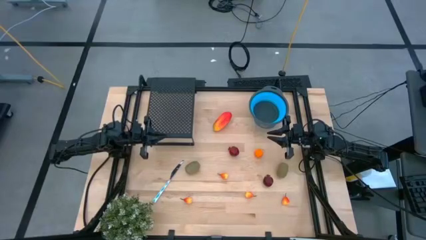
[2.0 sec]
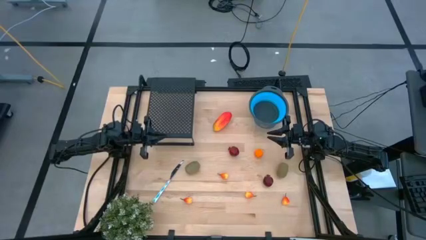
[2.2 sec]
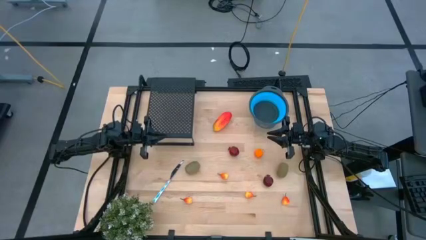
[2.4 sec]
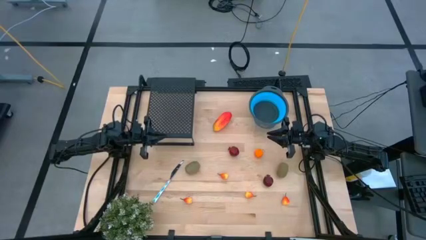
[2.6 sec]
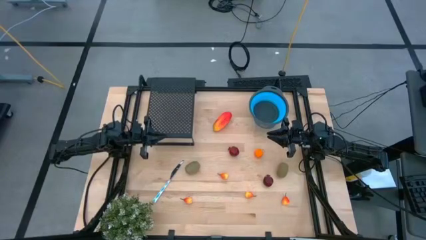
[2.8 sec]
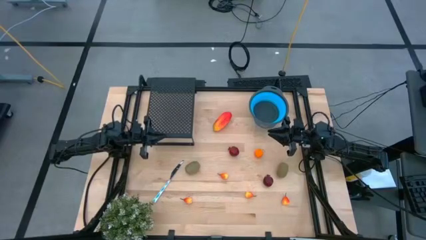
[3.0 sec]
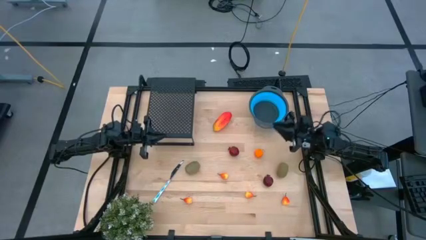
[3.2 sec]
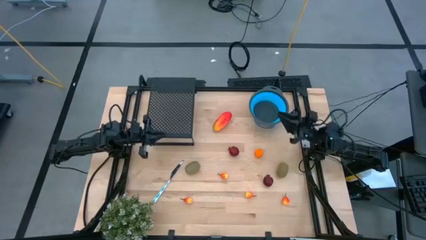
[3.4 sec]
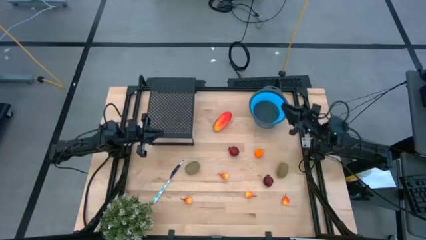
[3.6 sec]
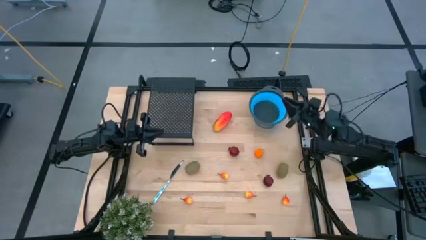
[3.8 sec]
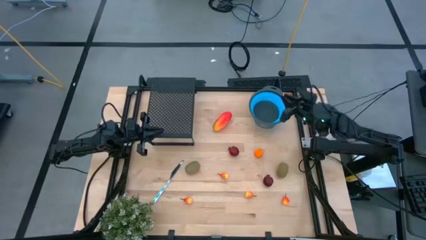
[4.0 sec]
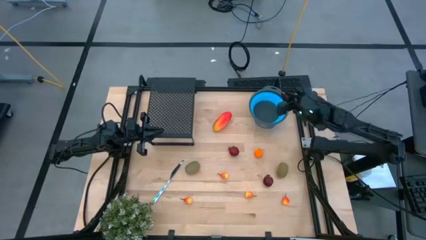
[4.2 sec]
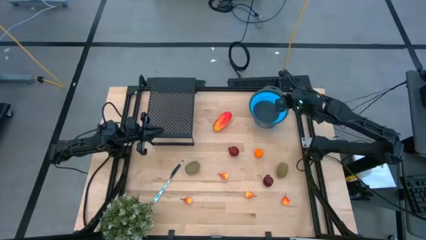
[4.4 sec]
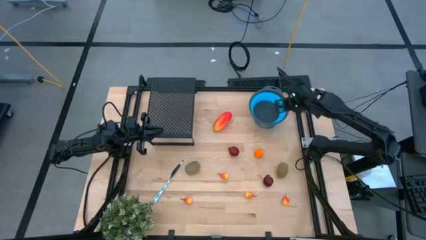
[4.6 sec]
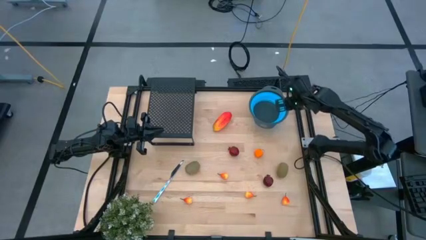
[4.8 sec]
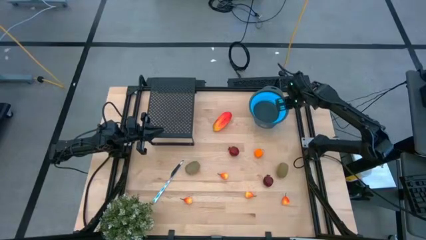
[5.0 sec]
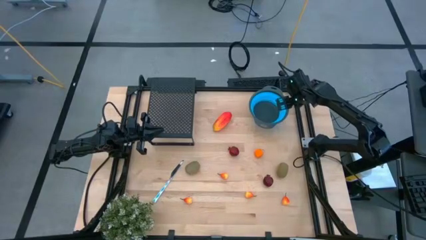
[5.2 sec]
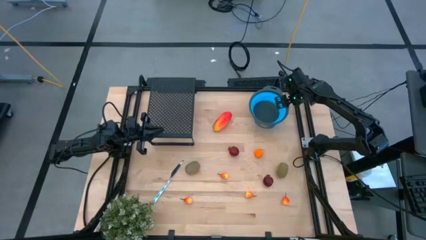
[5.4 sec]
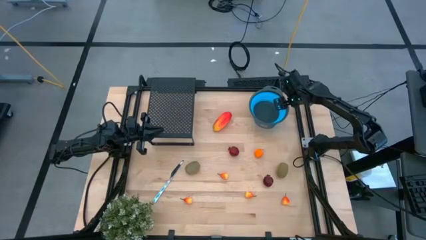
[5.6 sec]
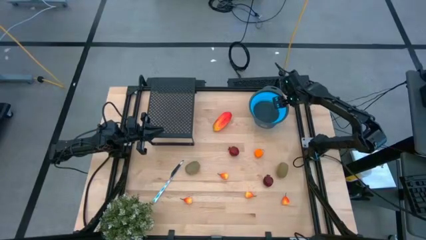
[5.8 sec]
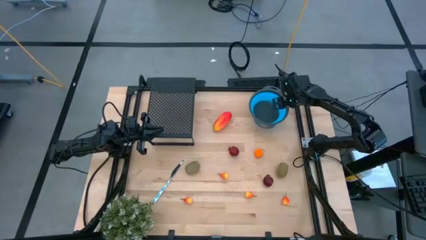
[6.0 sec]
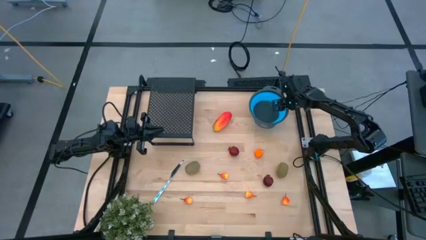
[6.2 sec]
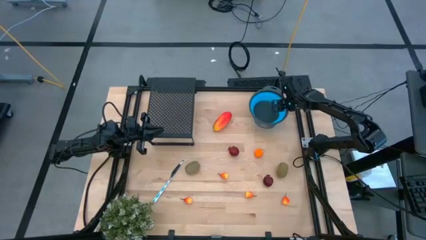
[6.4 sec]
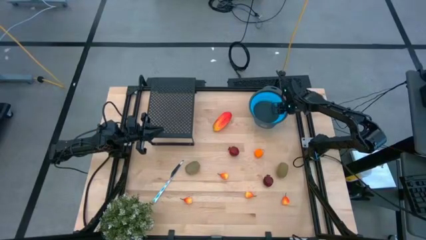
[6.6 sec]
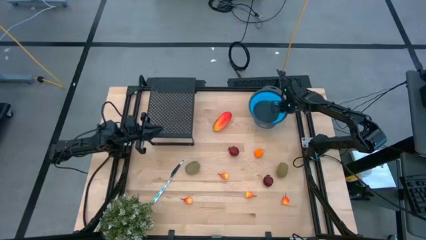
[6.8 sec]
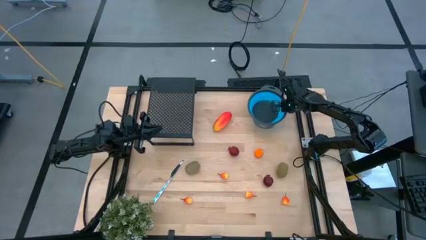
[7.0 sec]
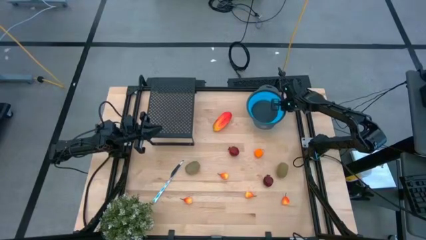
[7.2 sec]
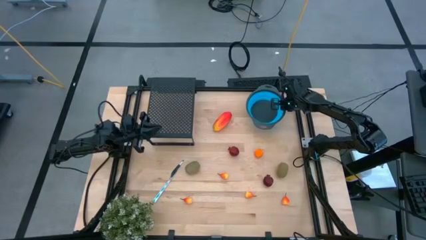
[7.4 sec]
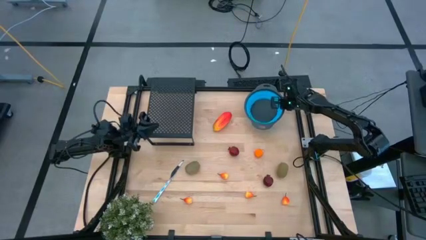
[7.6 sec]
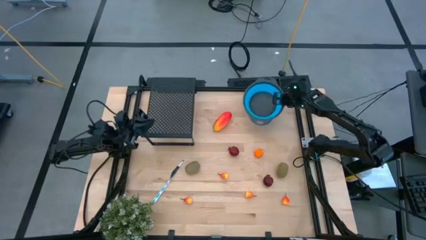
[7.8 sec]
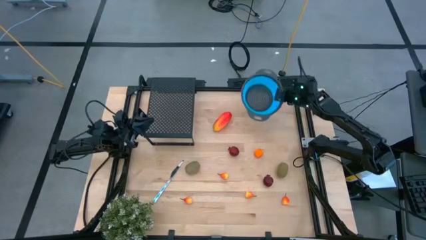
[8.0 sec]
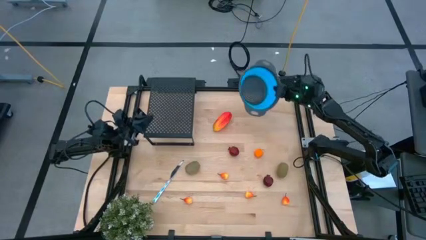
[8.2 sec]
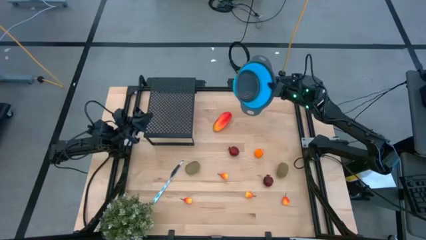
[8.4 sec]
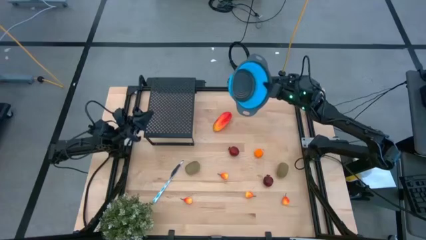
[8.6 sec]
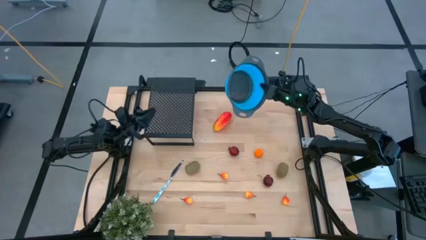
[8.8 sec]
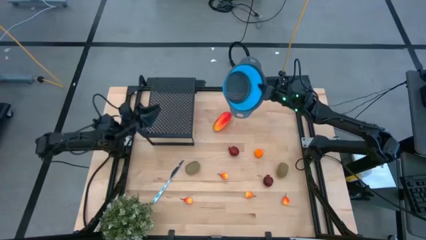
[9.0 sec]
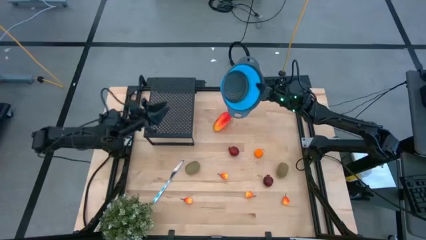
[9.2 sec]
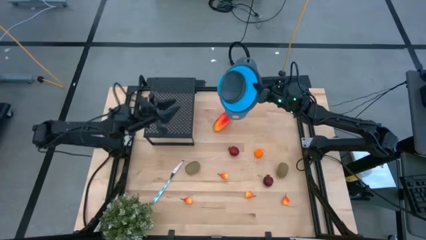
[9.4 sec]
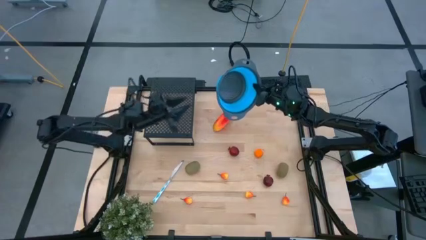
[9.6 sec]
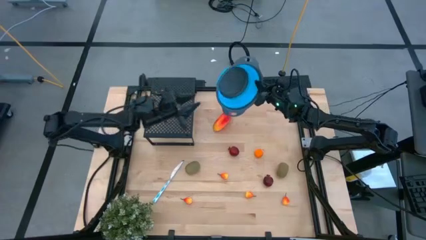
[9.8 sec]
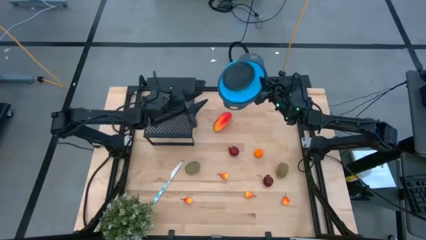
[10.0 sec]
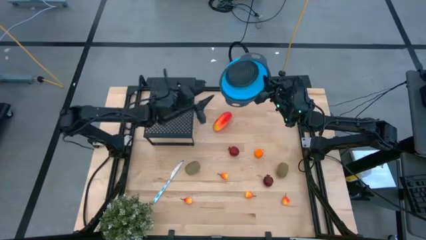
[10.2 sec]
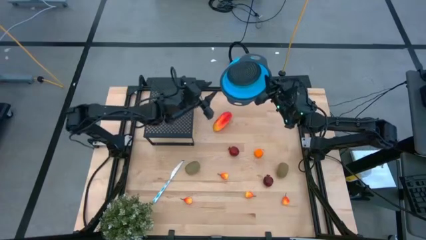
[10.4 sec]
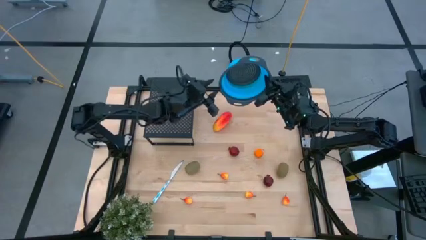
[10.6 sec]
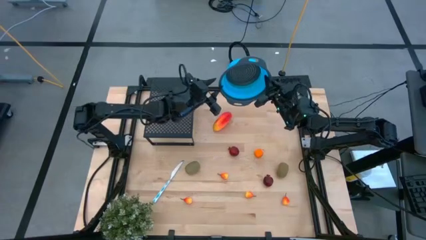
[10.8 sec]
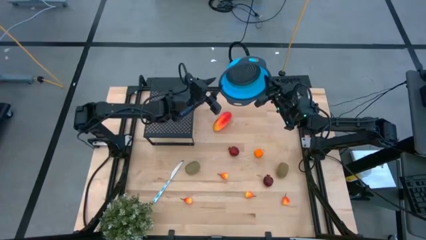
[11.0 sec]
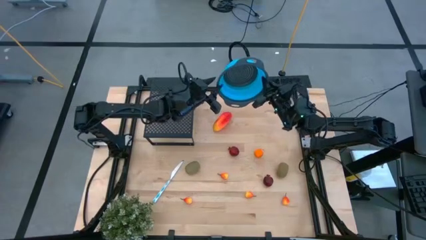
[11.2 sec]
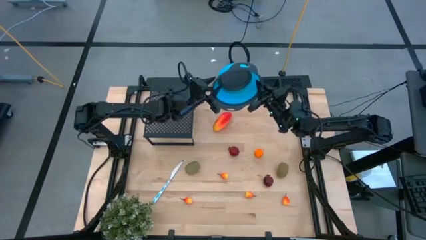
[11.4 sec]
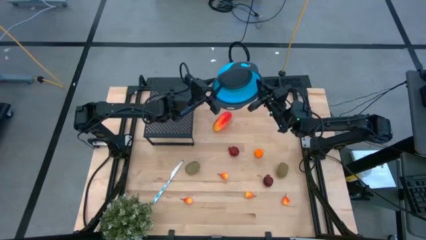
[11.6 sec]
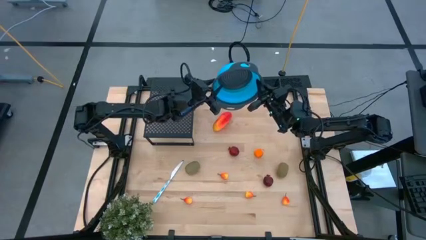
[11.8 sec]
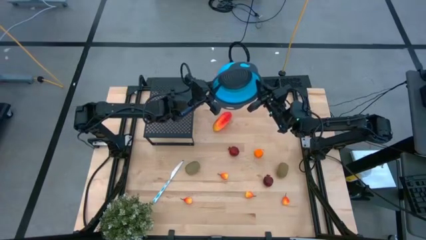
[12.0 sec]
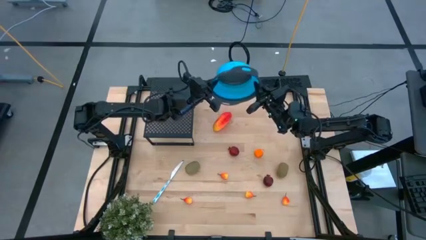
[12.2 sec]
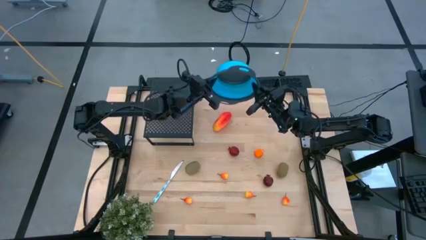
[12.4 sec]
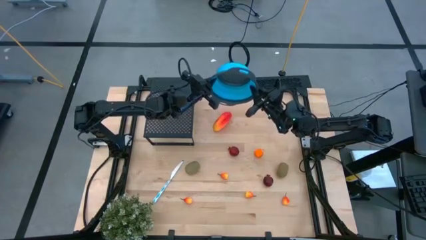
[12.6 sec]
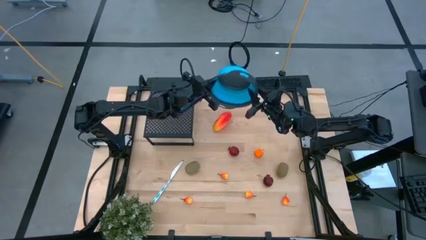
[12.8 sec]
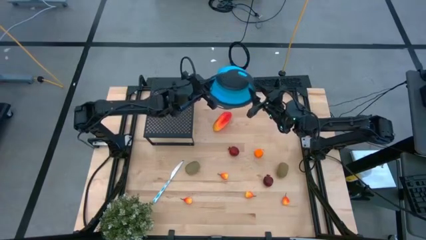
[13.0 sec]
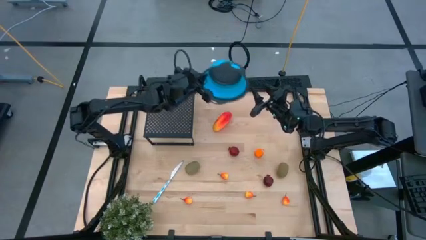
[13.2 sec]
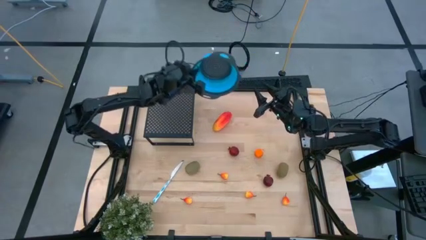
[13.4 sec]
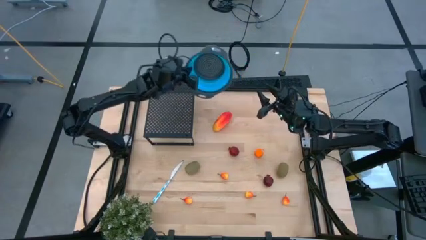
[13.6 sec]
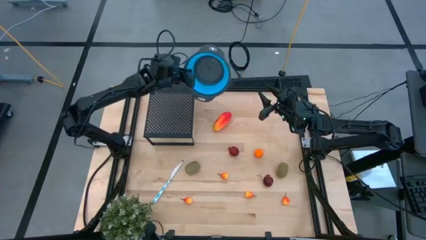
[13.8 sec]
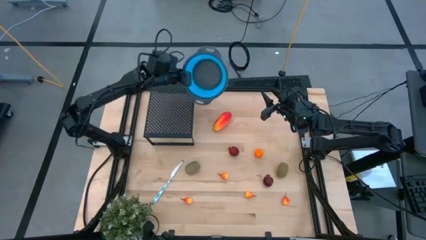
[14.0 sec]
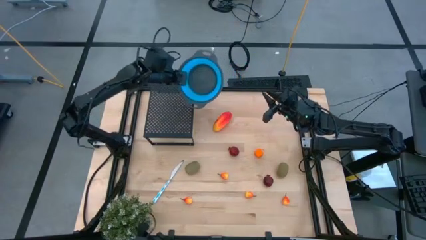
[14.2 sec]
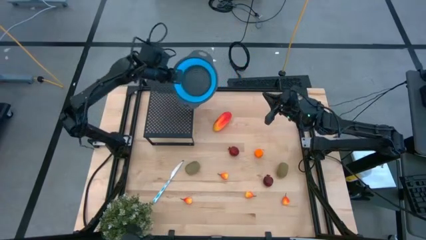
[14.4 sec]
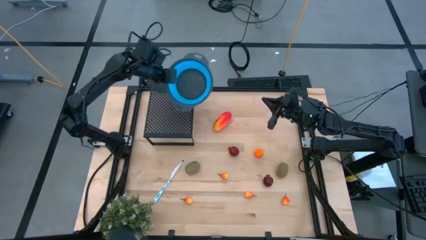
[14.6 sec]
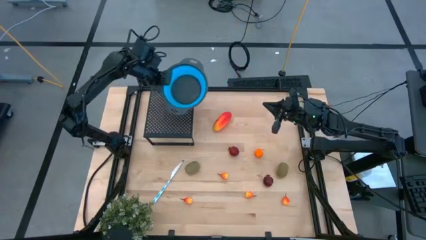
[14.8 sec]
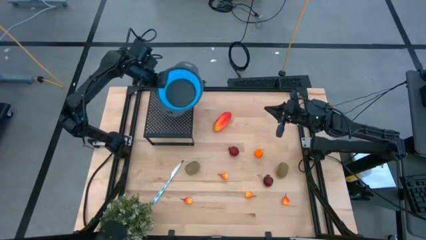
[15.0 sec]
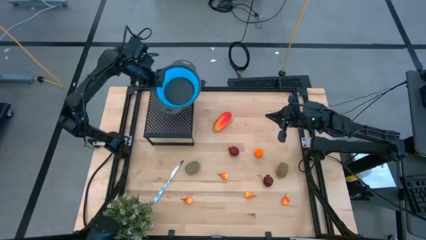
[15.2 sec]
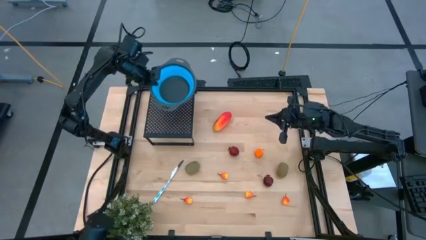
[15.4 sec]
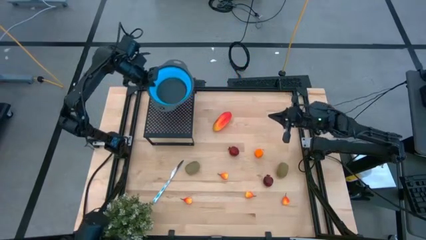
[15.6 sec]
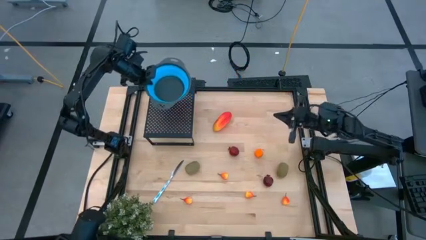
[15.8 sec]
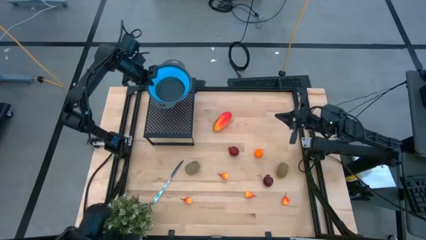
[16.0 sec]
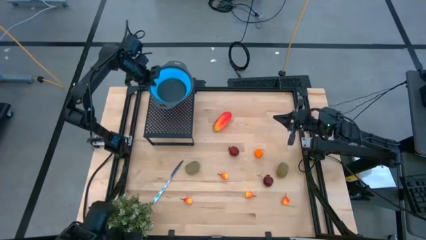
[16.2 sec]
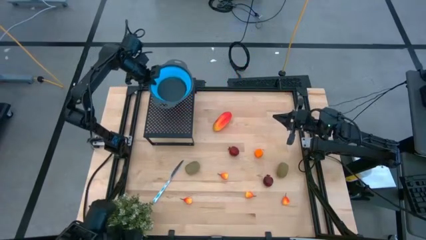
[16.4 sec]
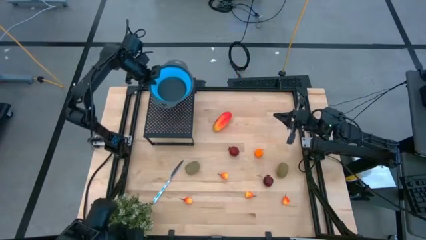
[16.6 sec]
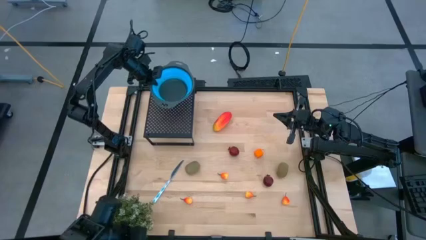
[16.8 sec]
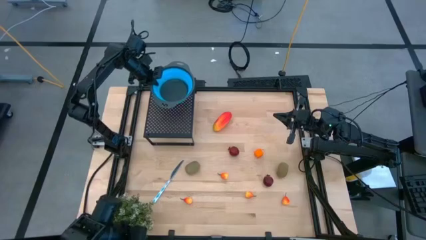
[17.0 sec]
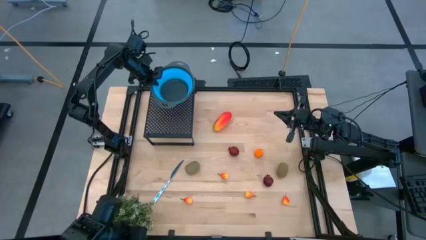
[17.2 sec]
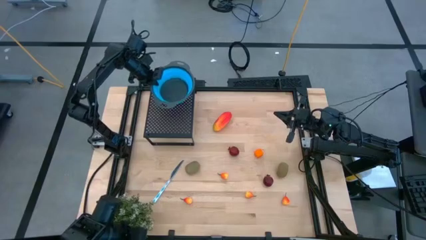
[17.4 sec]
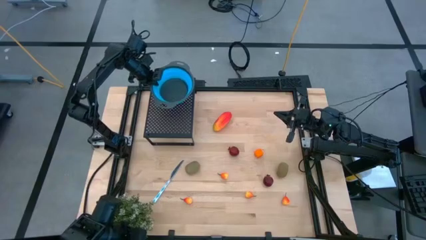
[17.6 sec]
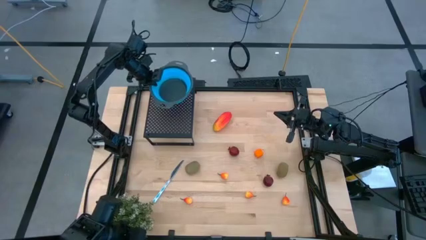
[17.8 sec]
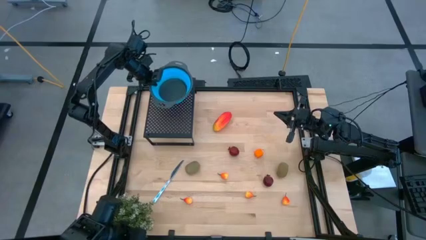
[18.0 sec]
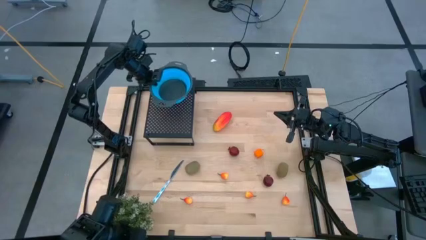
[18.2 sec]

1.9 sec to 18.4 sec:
Task: Pick & Place Fruit
Put the blue strainer bowl on the shelf
